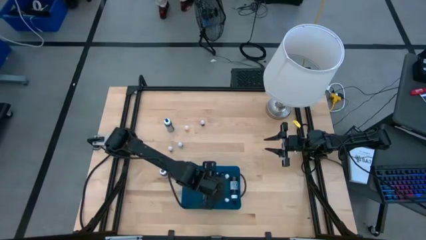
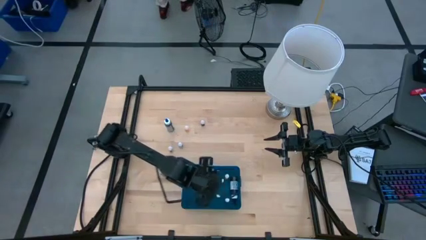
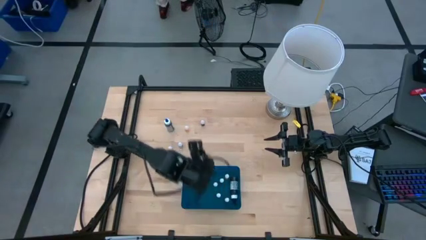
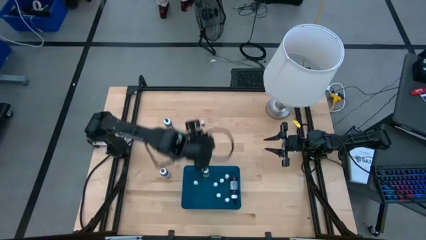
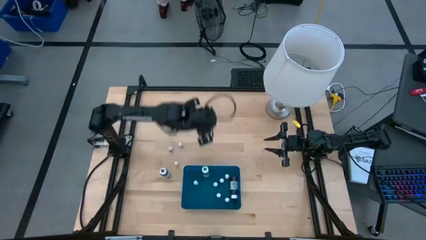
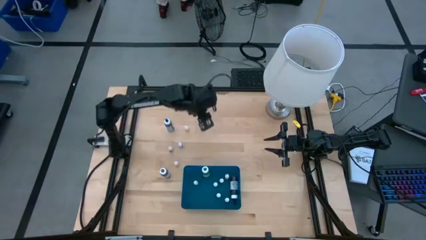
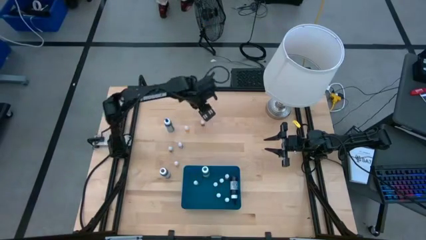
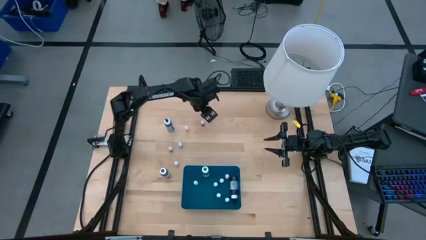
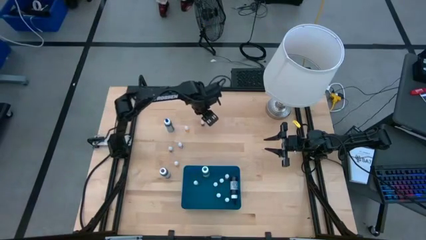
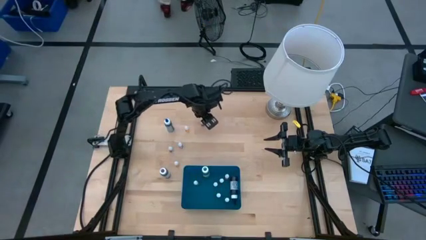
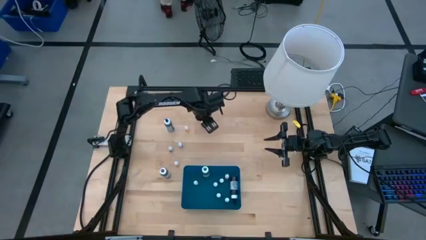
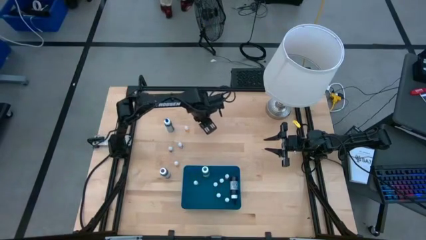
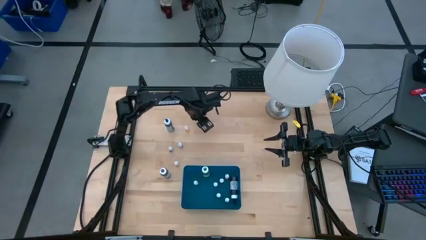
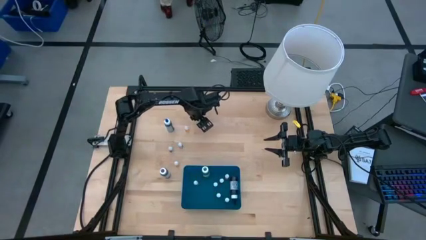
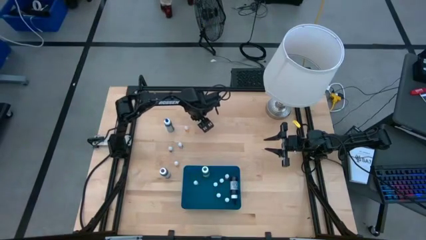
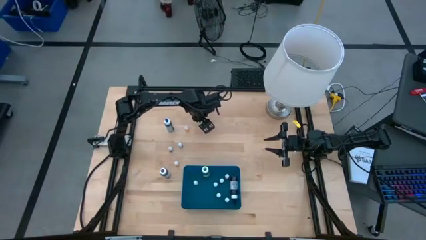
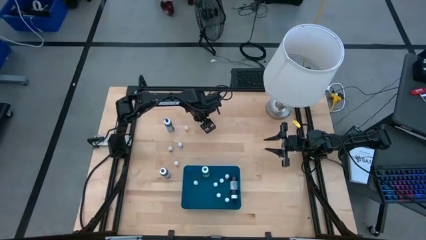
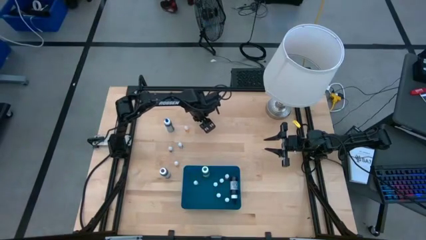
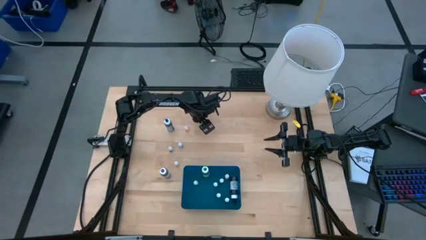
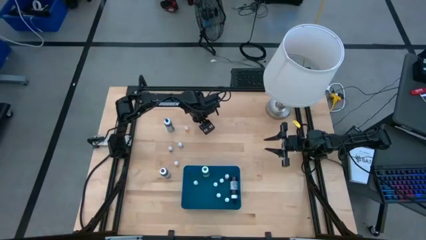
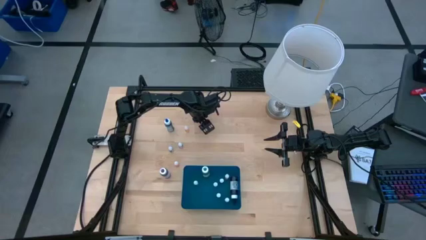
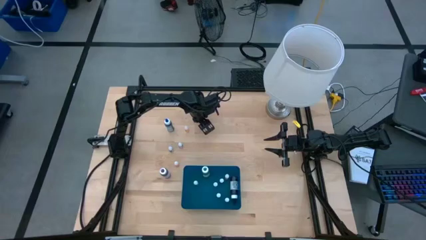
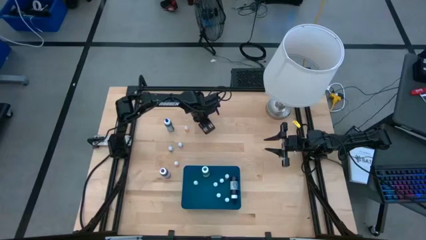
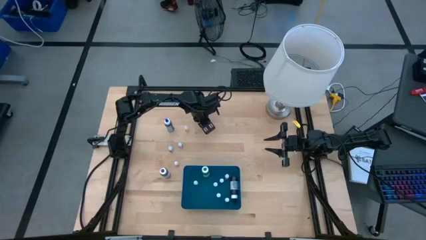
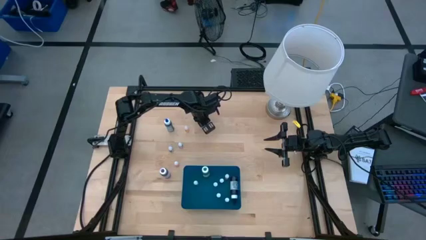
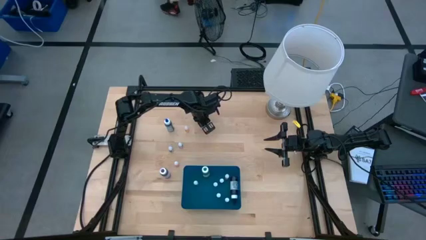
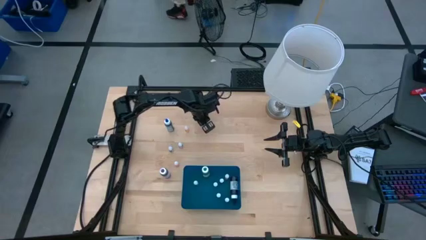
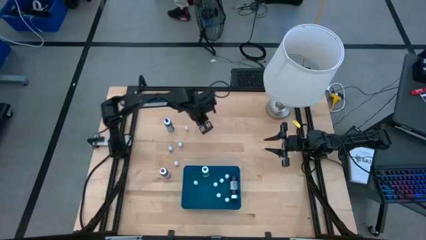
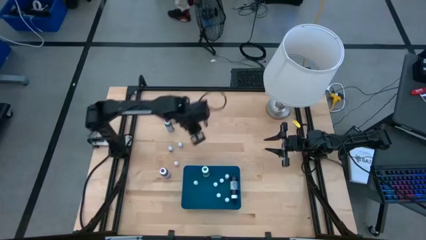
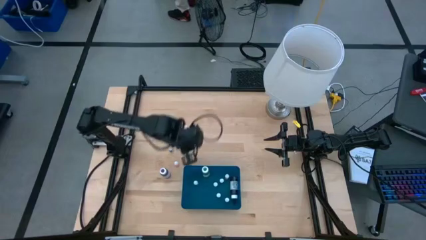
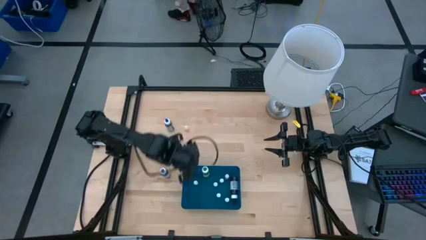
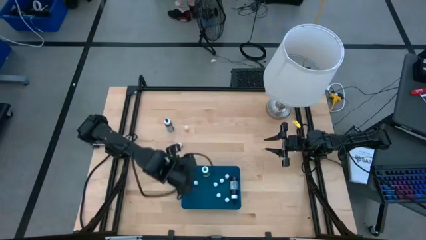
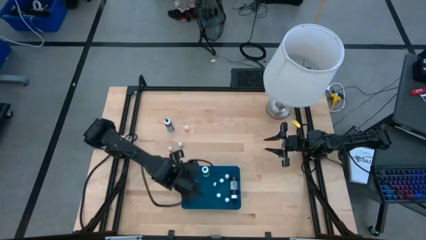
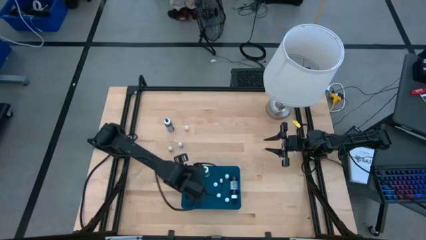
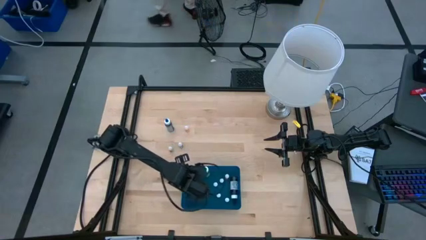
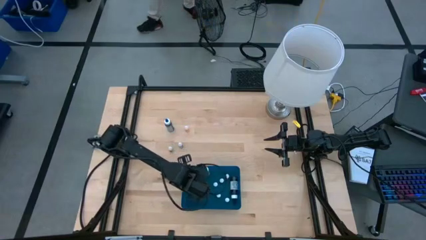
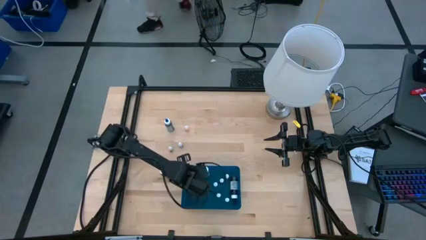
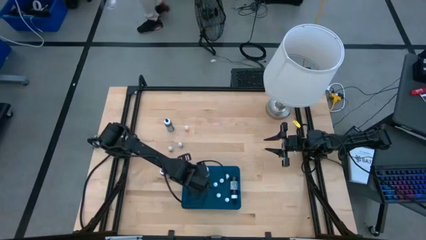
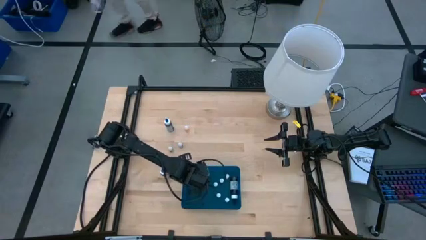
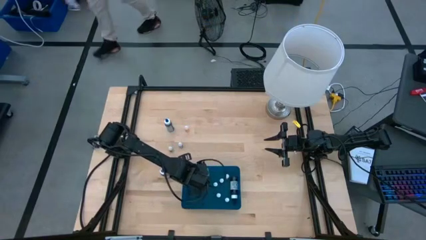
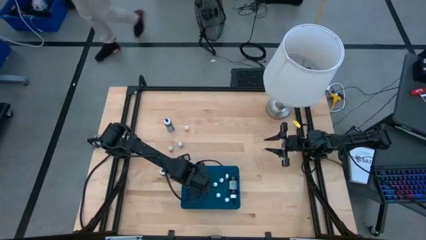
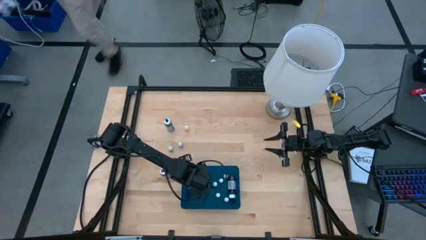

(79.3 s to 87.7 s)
Task: Pick & Place food coloring
Put the blue food coloring bottle into the blue container

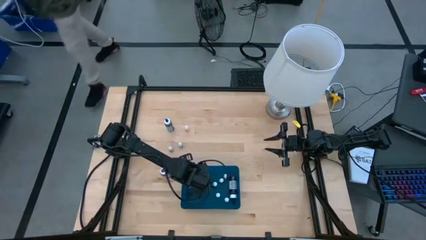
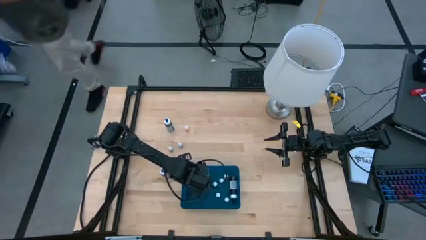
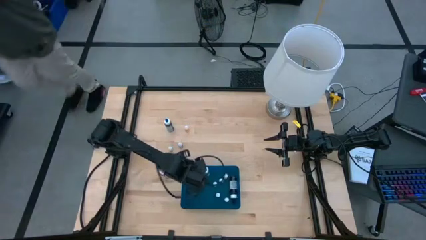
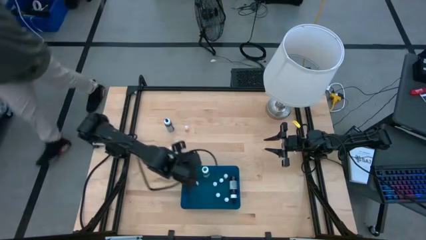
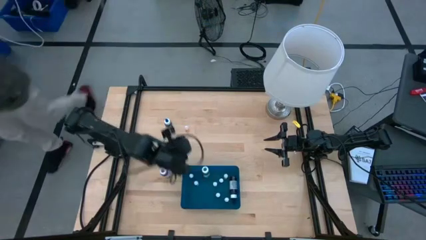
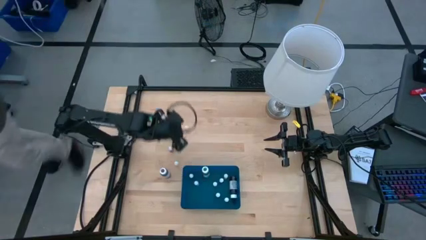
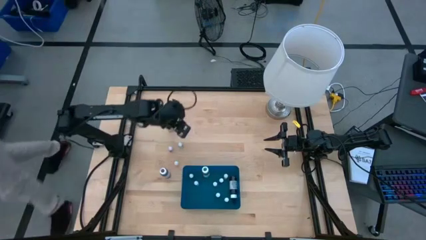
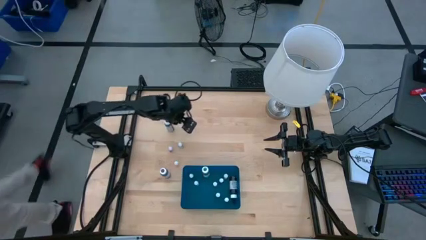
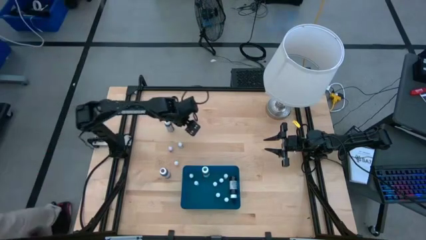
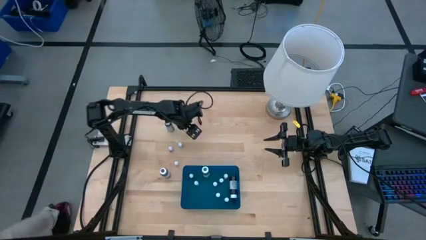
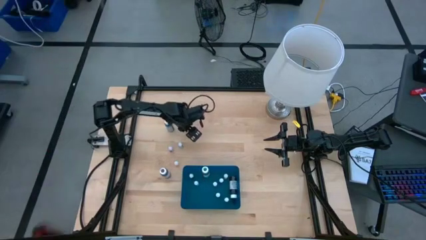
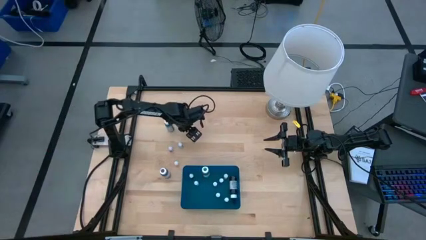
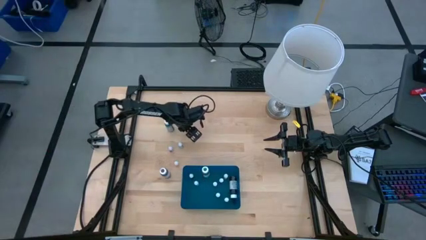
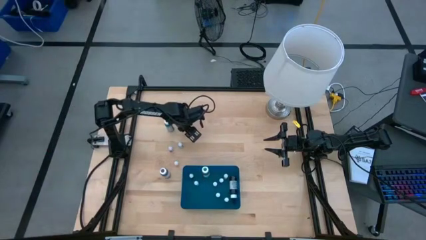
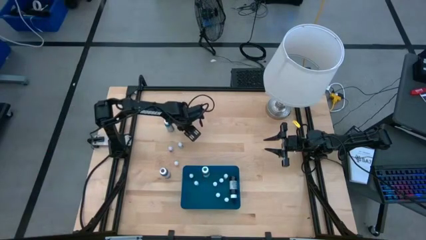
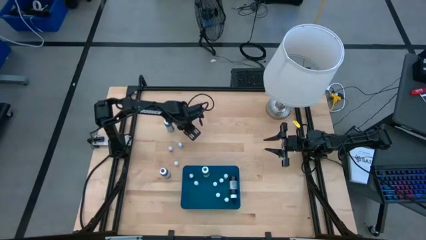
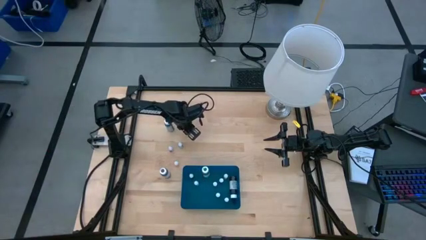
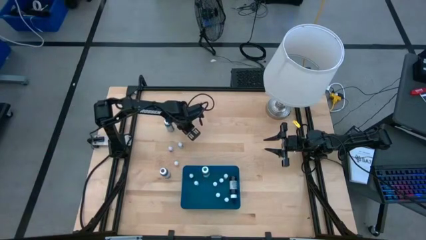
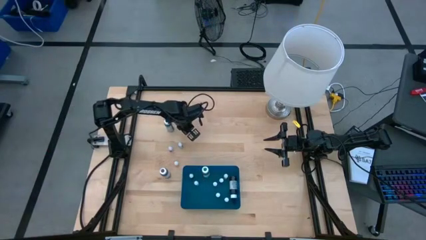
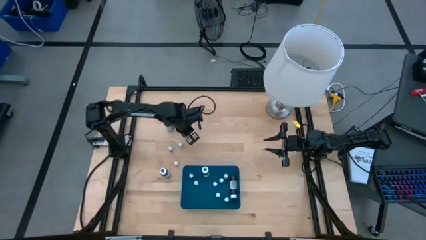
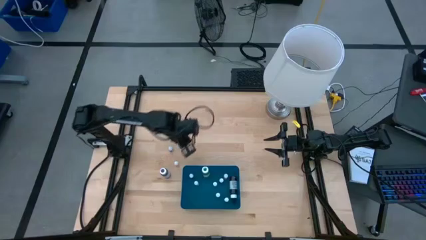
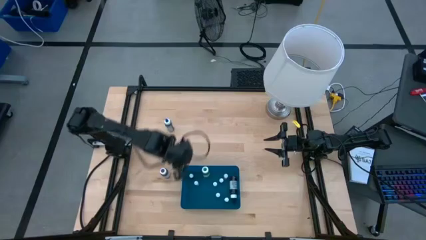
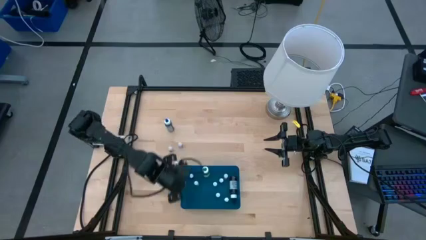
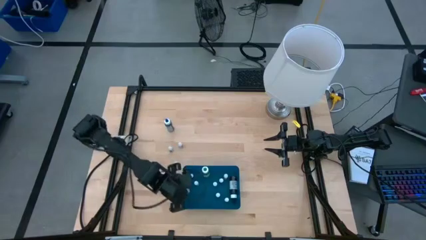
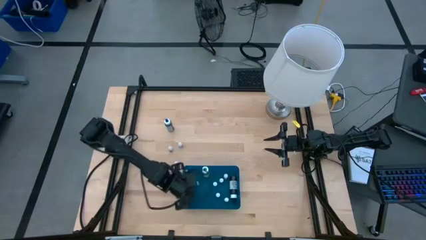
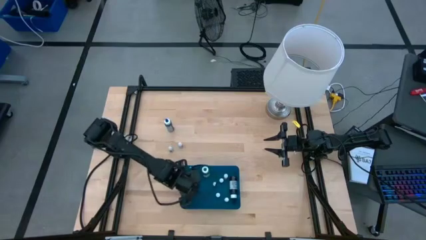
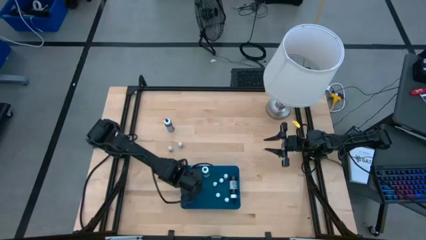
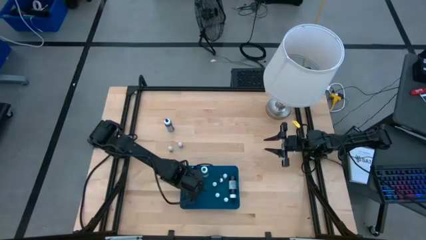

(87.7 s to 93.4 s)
Put the orange food coloring bottle into the blue container

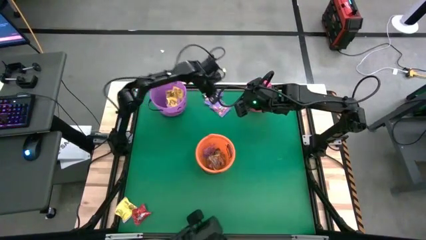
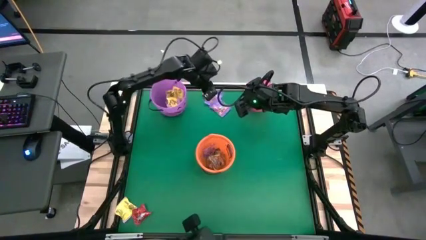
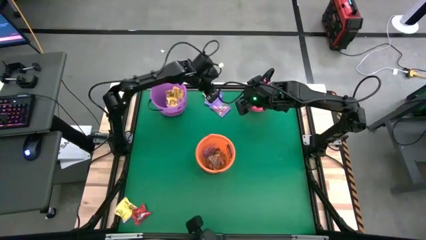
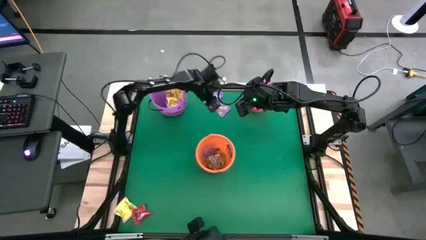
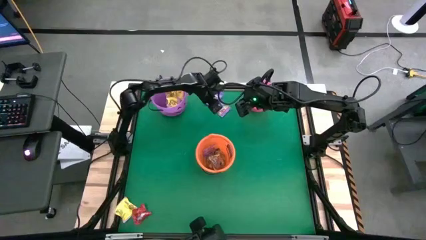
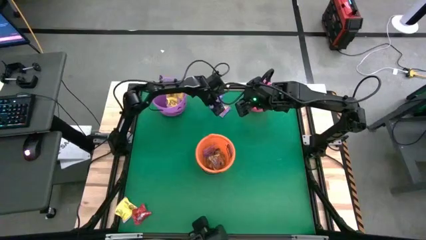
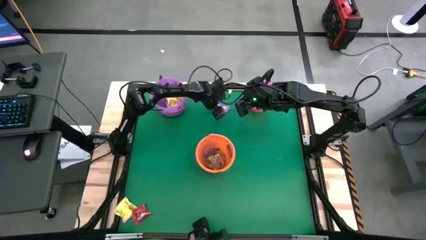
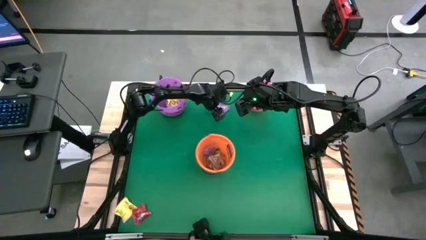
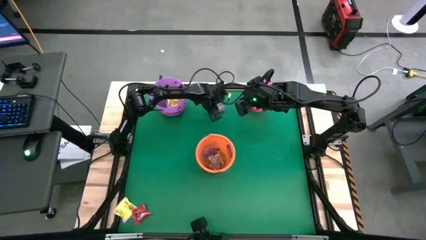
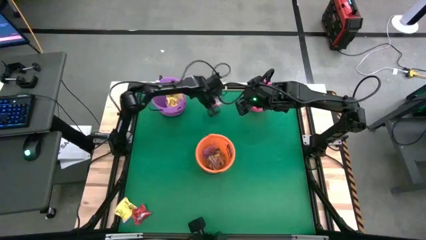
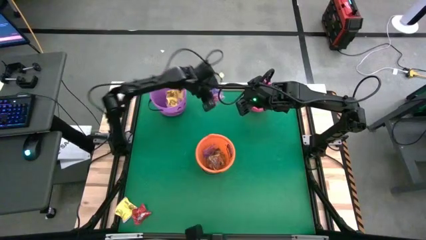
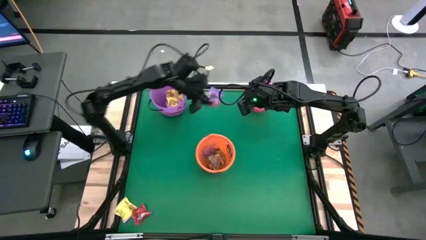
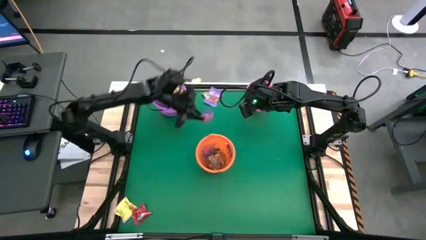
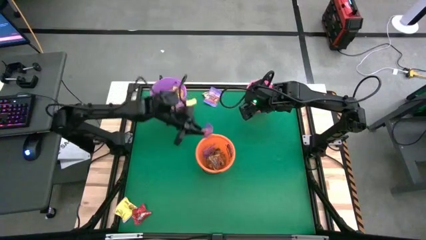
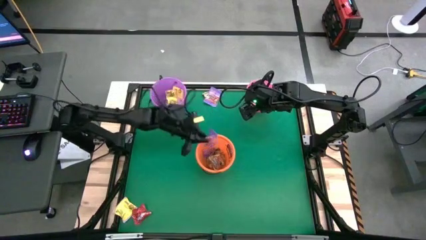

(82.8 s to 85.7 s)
Task: Sort candy by brand, put in halloween buckets
Put the violet candy into the orange bucket
